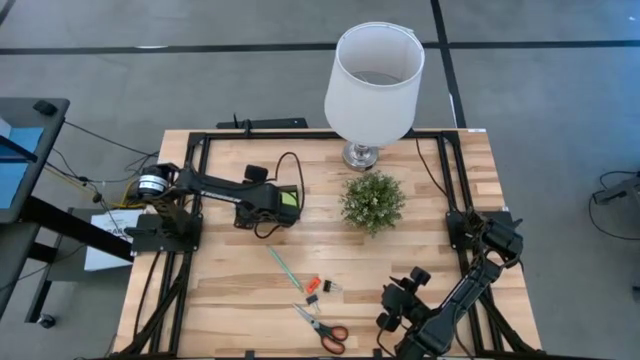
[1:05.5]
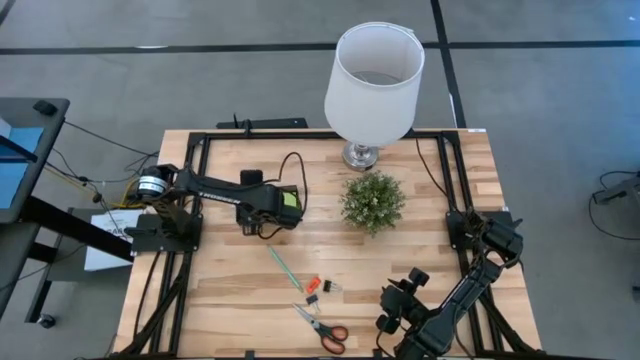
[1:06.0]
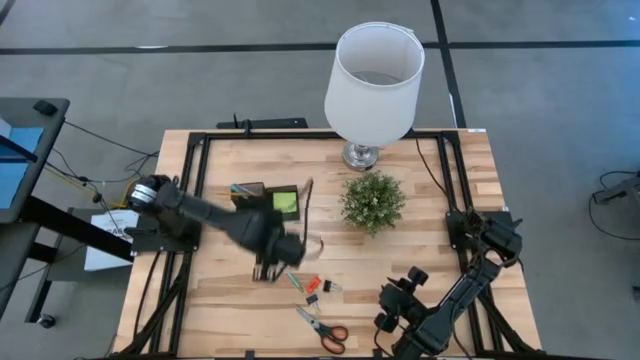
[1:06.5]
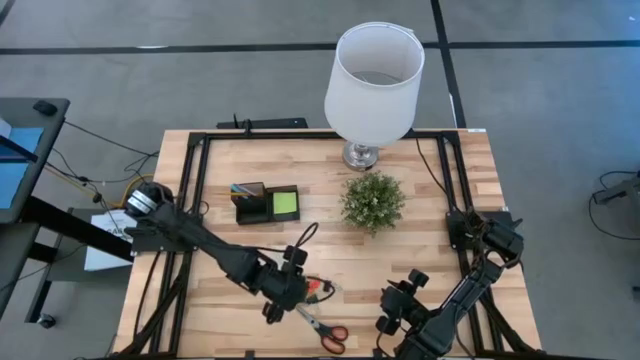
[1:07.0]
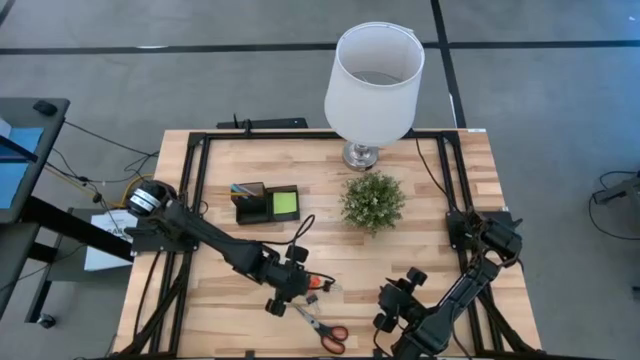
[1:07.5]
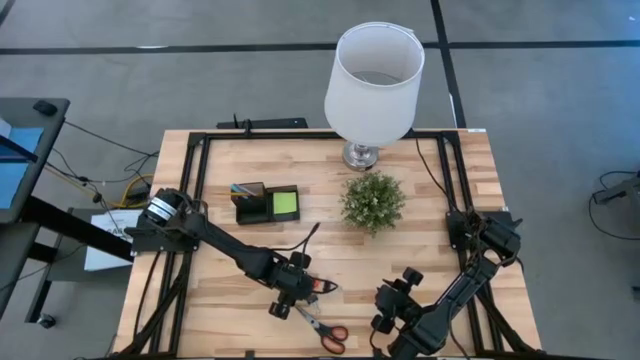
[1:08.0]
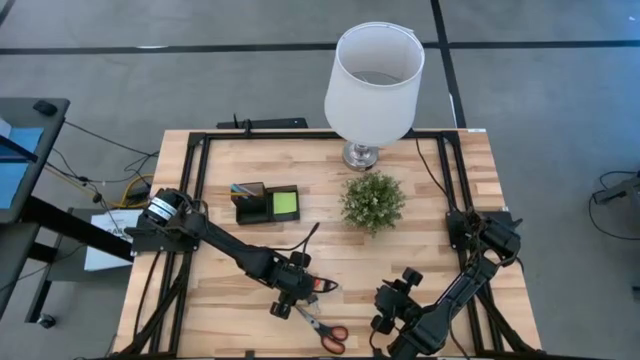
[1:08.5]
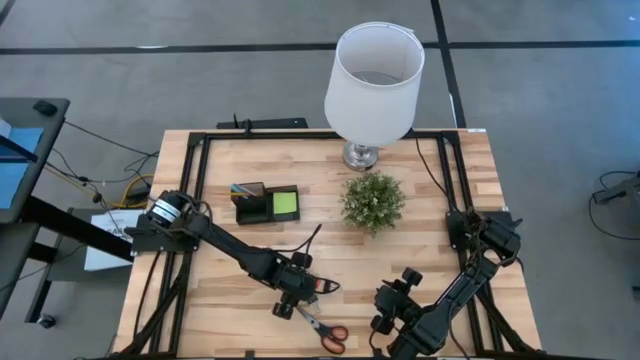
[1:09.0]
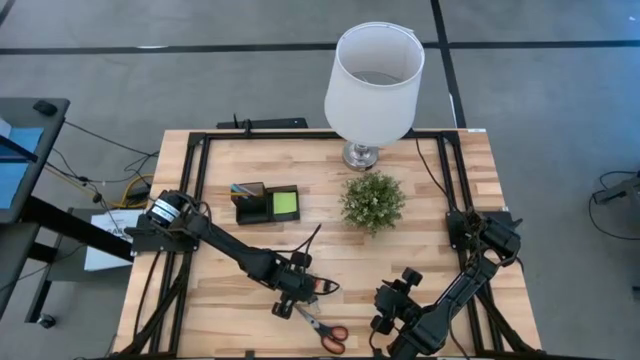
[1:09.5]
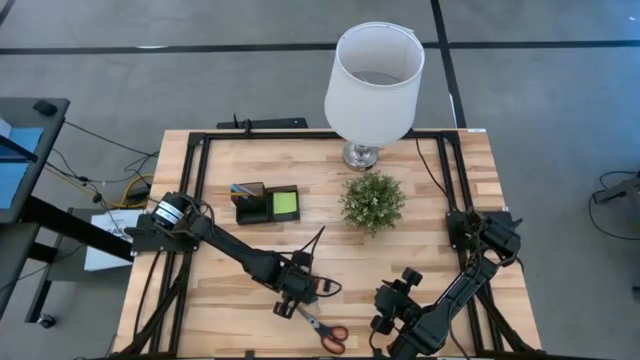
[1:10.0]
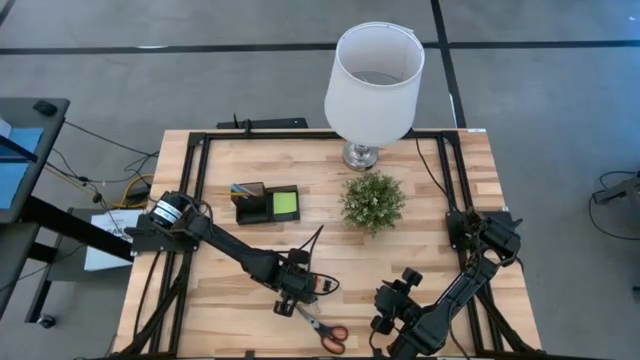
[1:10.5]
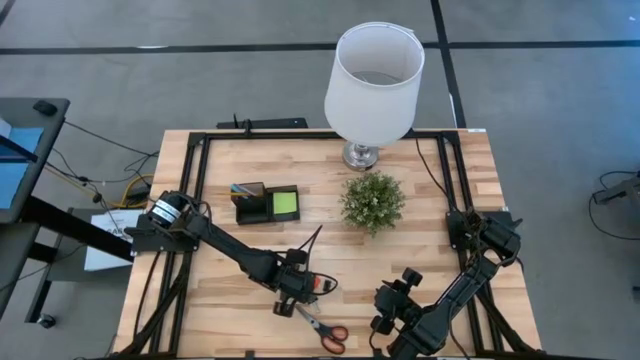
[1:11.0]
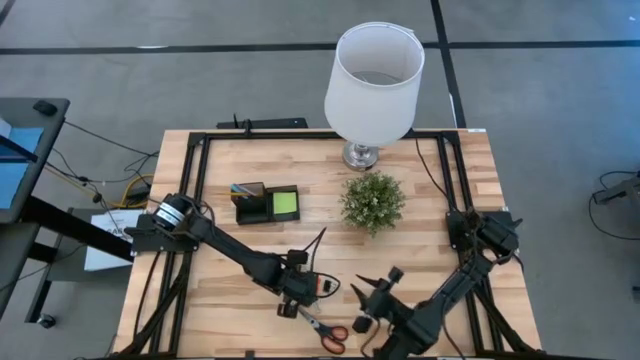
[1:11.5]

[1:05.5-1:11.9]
Task: Pick and place office supplies into organizer
Put the blue pencil into the black desk organizer

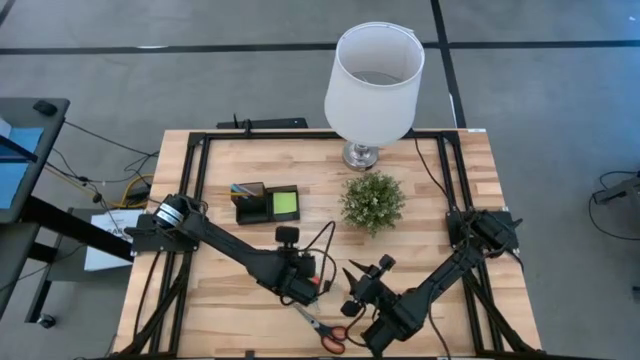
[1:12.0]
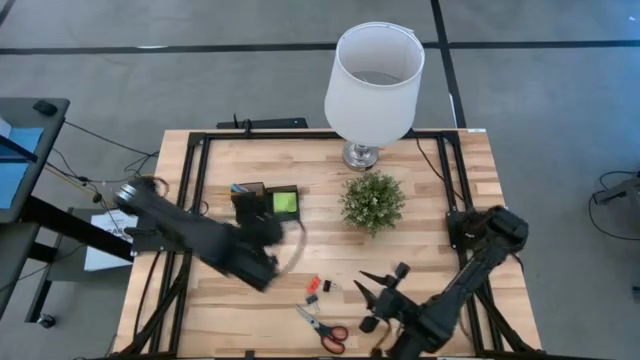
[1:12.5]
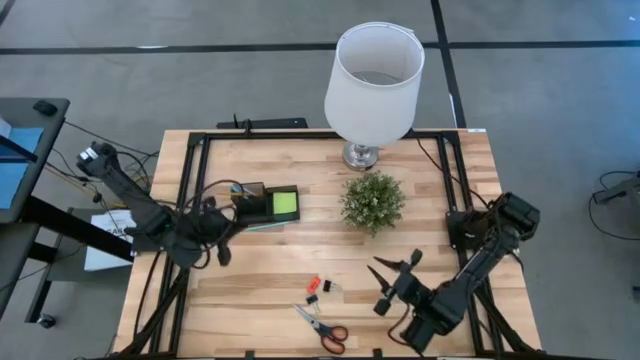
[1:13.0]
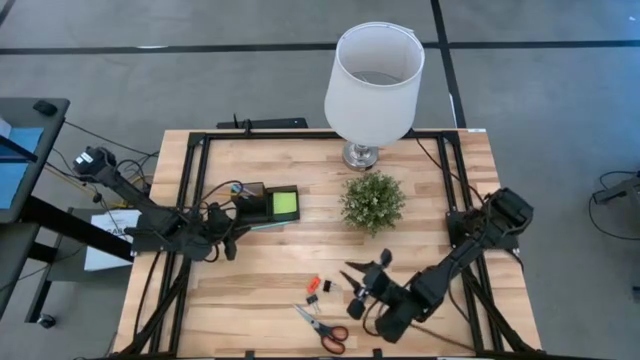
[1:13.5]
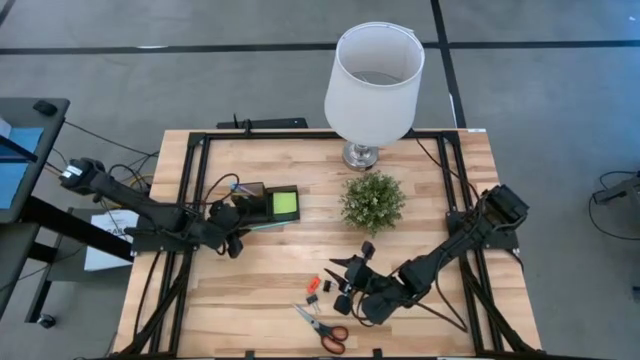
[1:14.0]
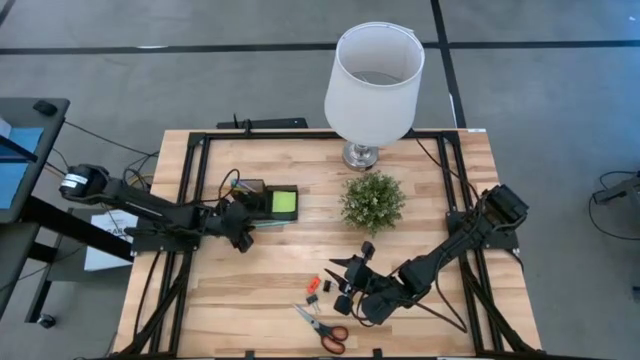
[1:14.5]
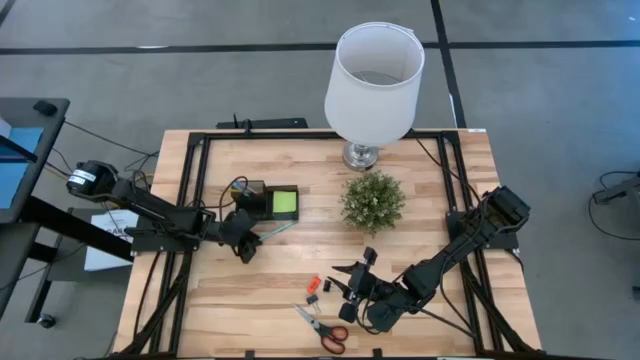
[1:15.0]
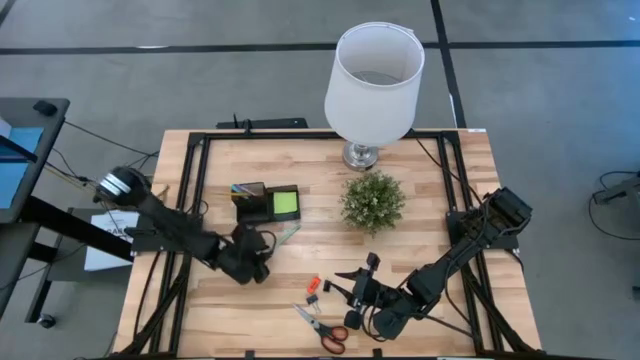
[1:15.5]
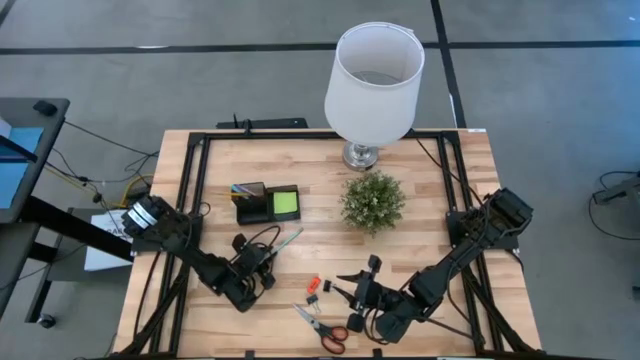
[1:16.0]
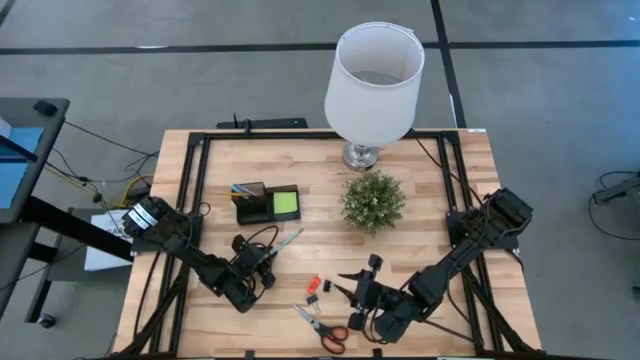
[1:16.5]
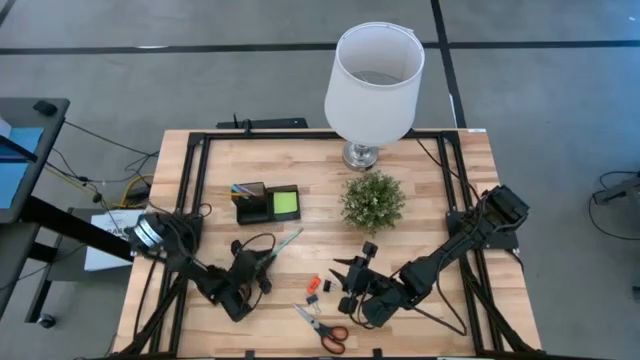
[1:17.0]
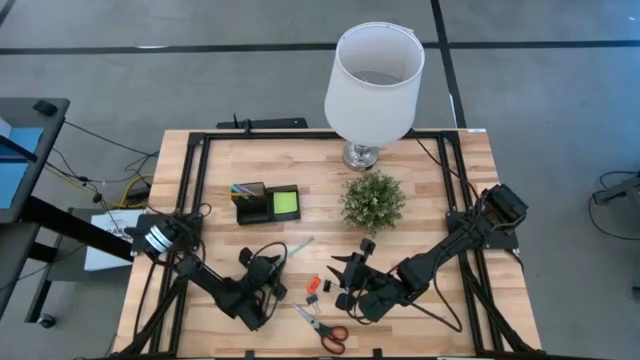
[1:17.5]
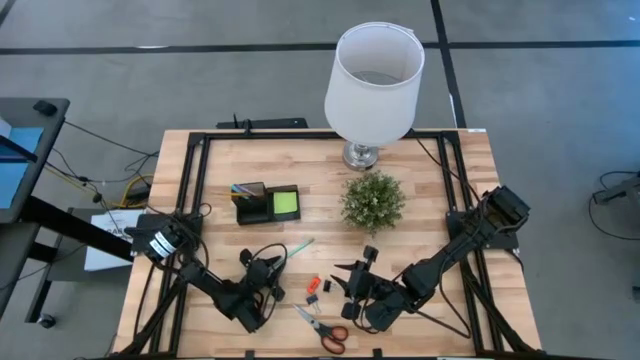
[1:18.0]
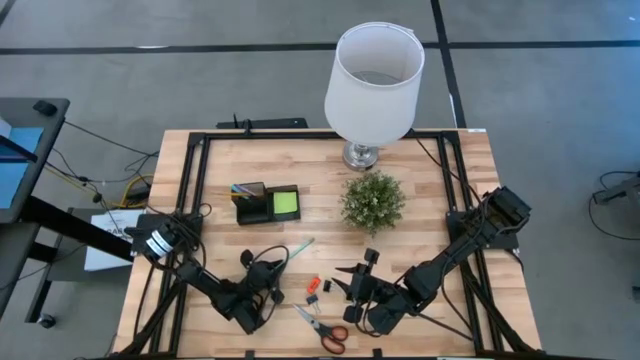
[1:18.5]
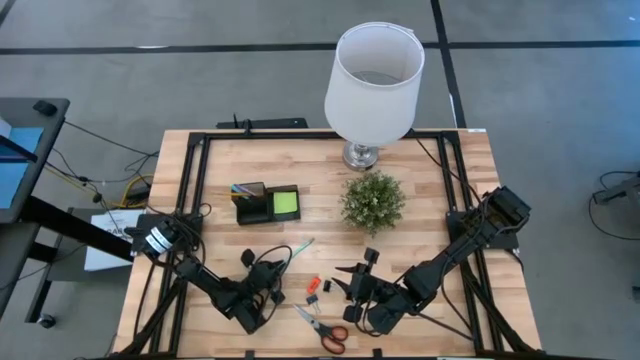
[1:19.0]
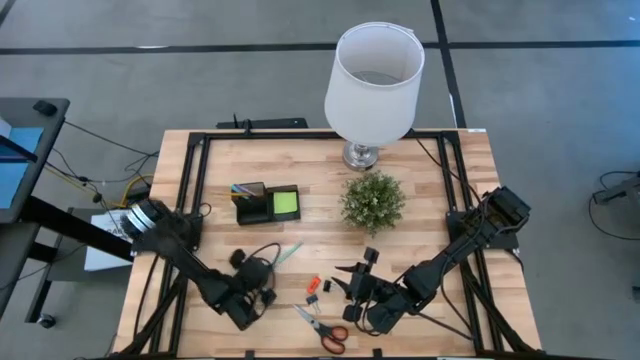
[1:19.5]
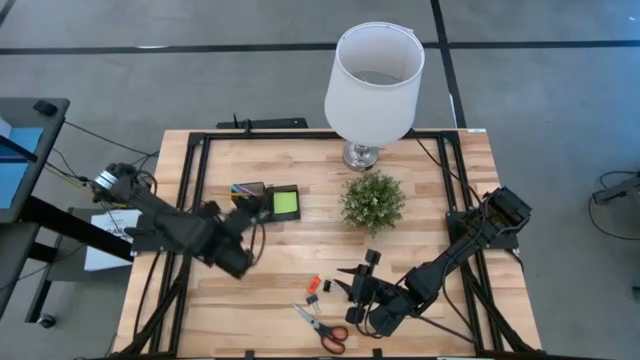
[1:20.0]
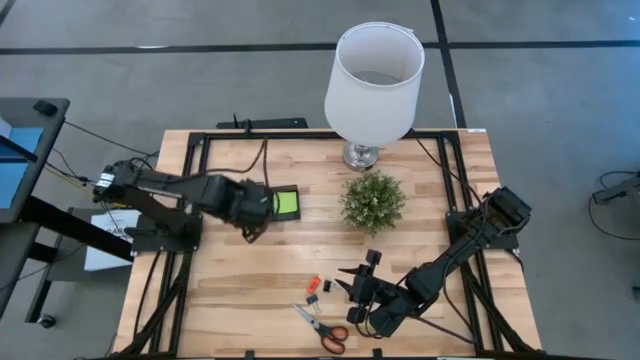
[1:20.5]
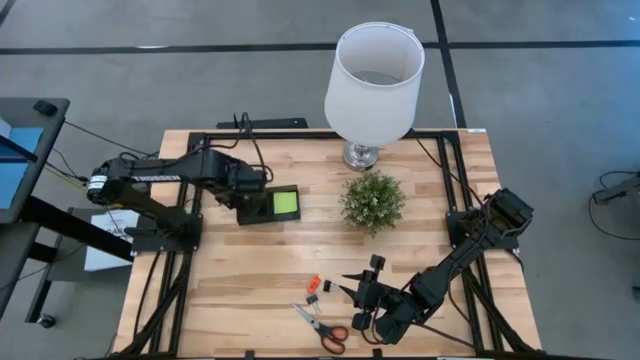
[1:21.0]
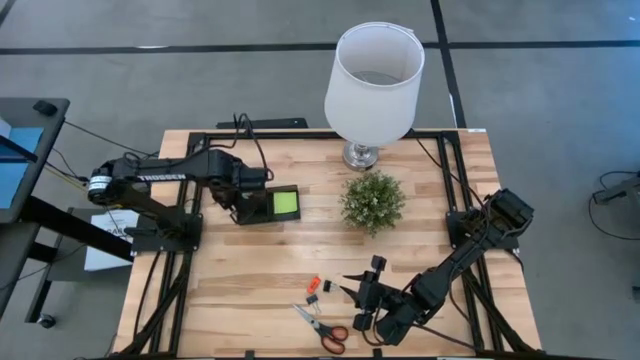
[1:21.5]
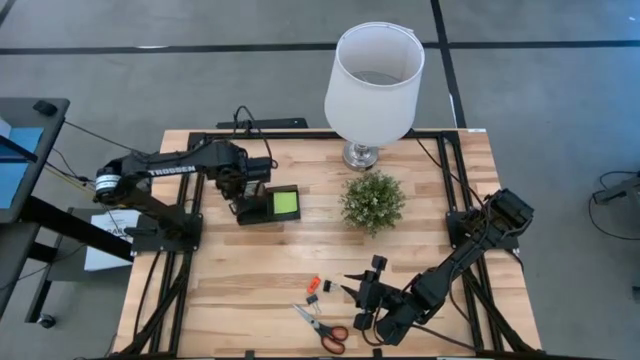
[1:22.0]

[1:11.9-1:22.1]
Put the blue pencil into the black desk organizer

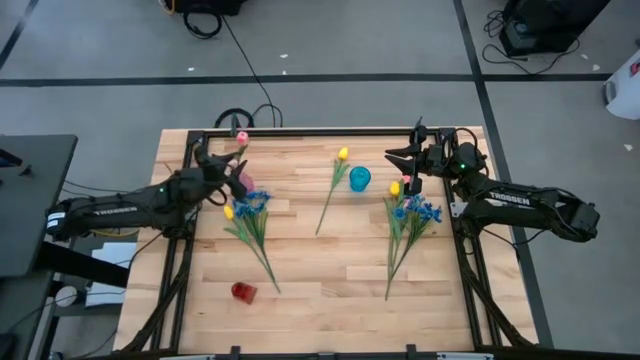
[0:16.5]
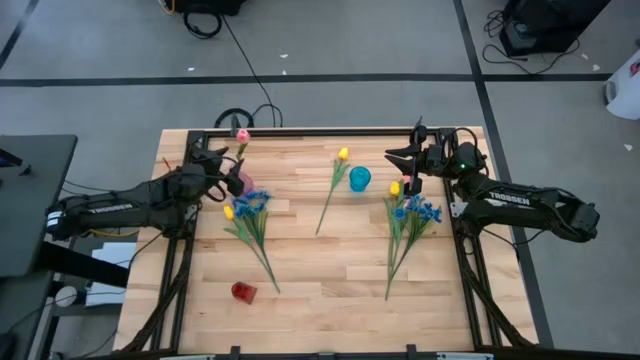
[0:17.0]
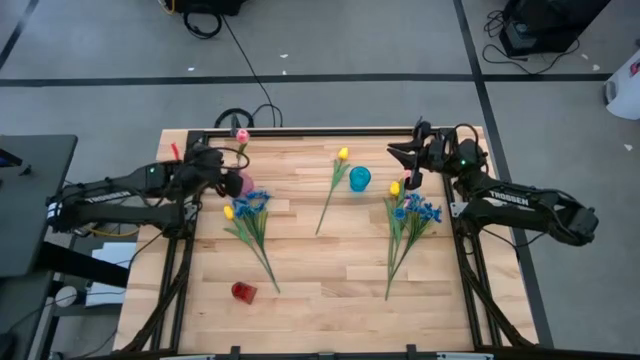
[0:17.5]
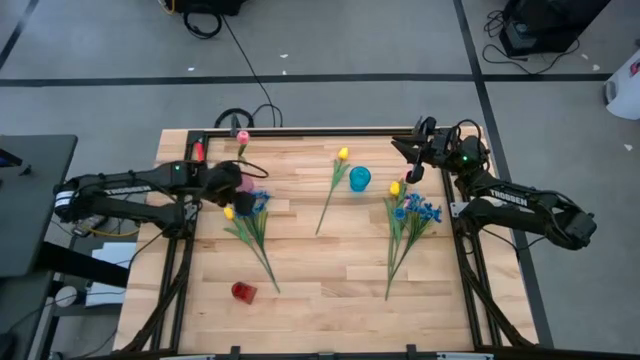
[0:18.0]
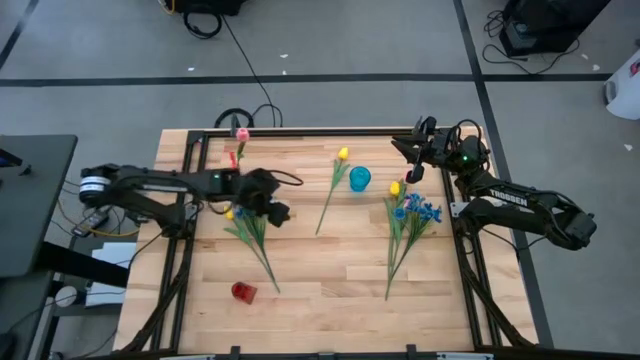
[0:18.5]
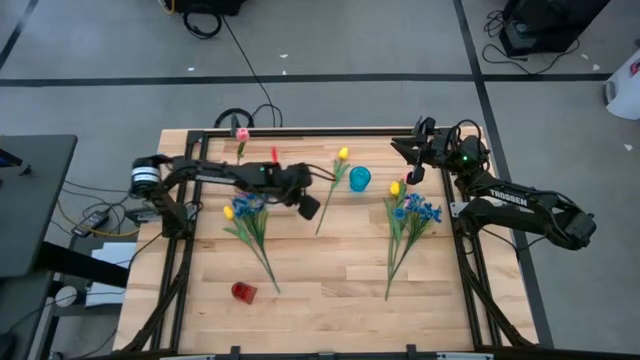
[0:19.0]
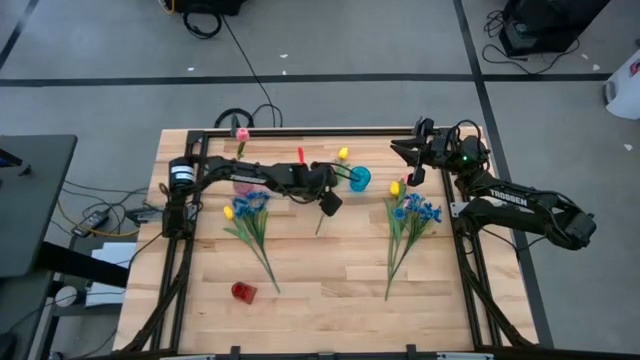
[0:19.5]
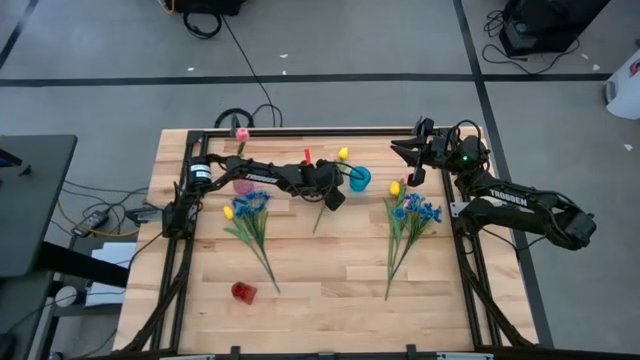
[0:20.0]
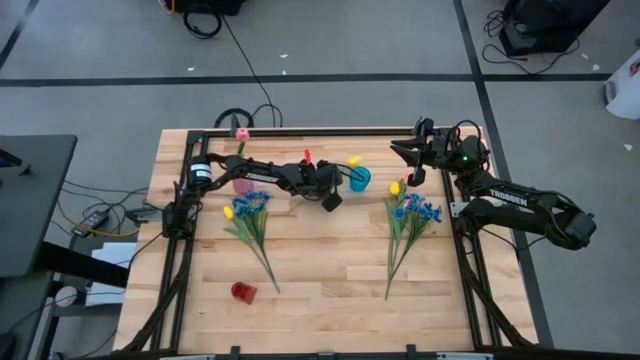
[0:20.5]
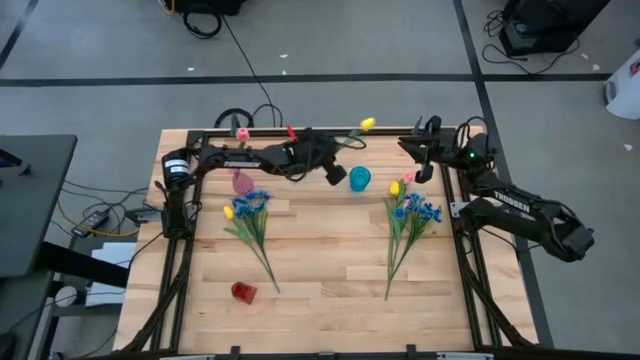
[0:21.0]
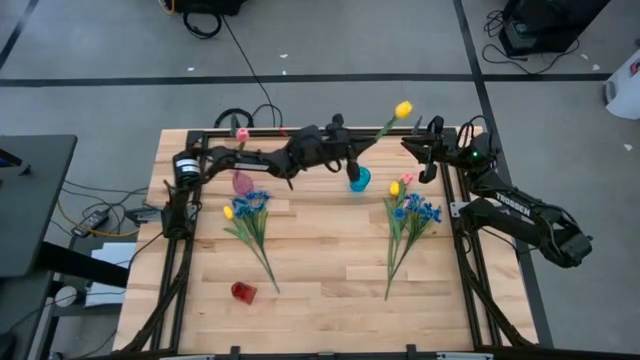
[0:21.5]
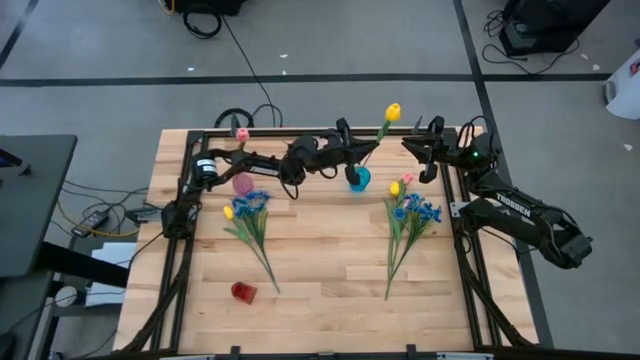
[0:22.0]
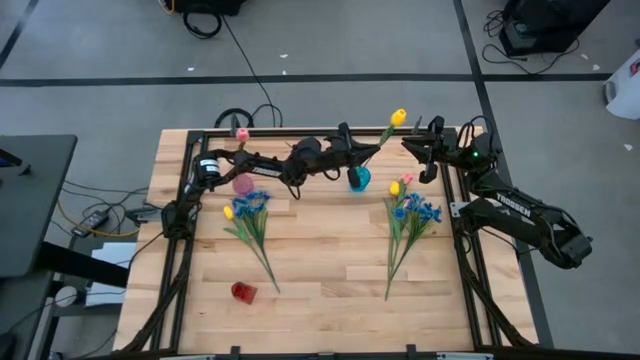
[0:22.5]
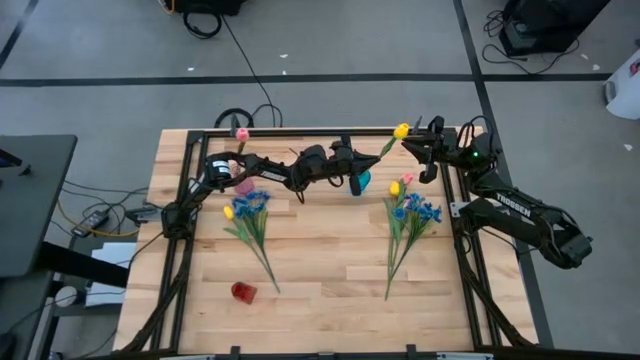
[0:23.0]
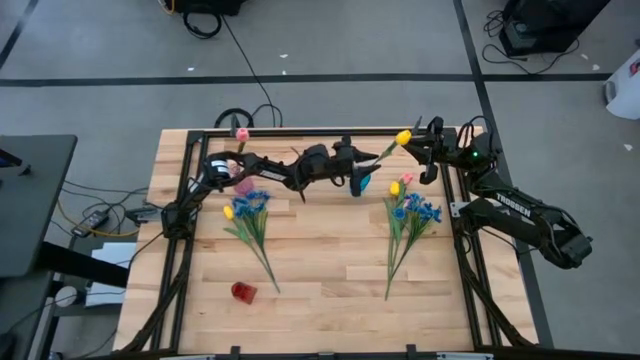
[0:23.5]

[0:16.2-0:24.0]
Task: Sort flowers into vase by color
Put the top center yellow tulip into the blue vase
